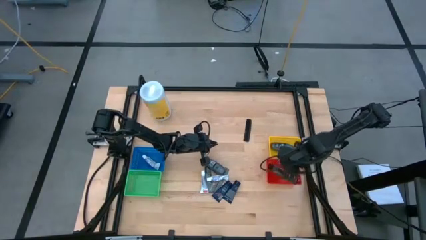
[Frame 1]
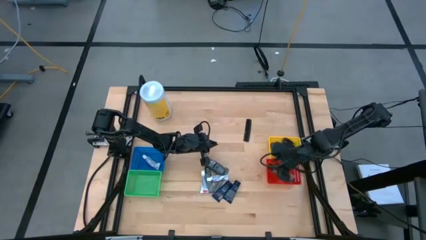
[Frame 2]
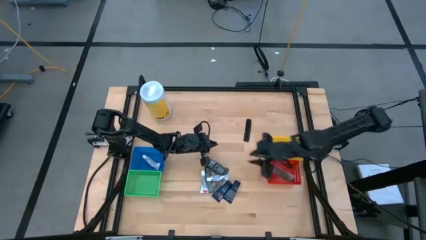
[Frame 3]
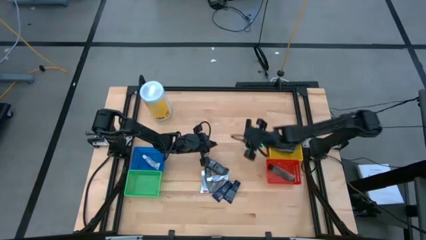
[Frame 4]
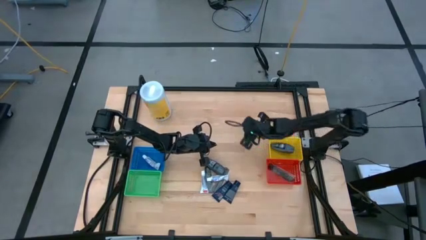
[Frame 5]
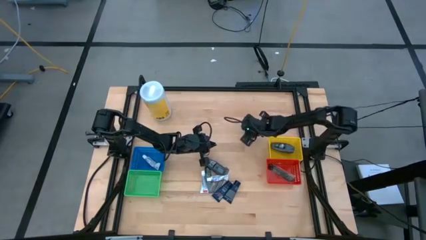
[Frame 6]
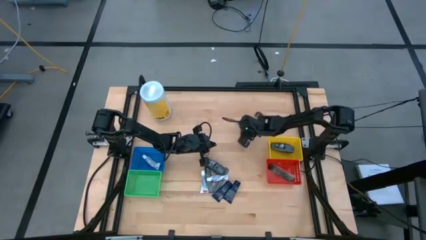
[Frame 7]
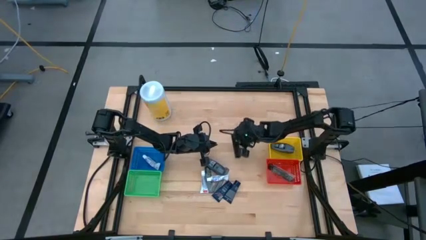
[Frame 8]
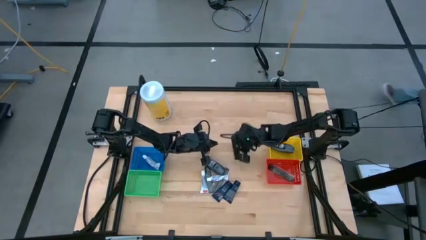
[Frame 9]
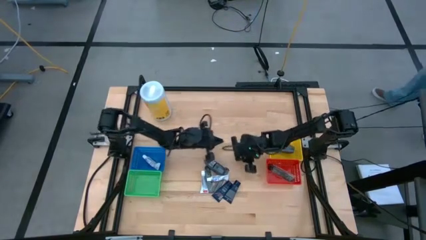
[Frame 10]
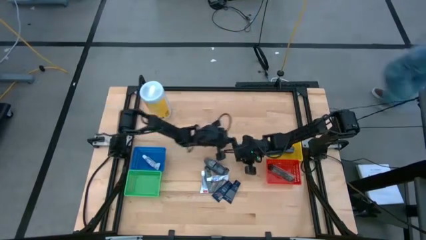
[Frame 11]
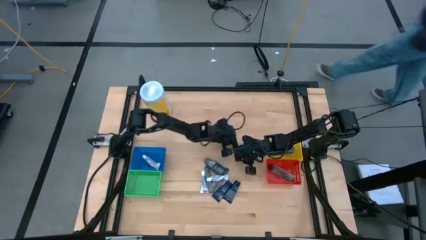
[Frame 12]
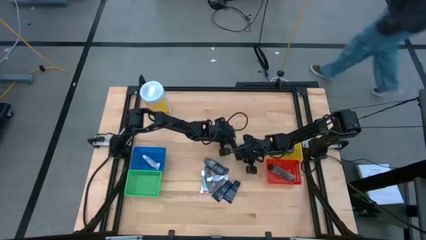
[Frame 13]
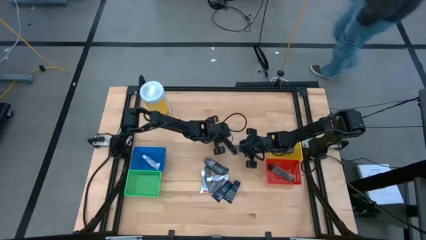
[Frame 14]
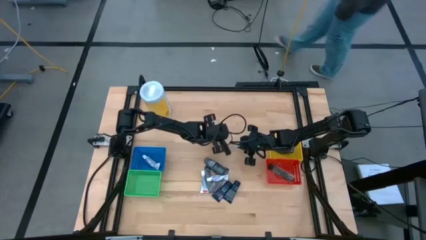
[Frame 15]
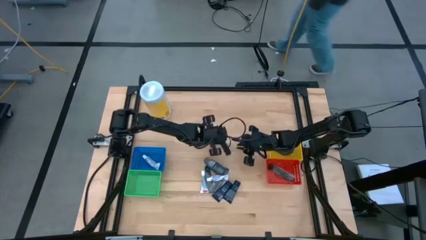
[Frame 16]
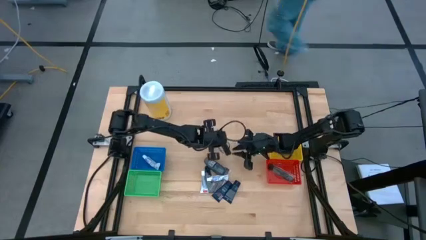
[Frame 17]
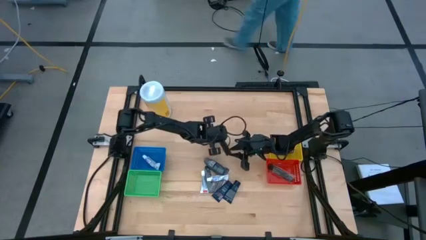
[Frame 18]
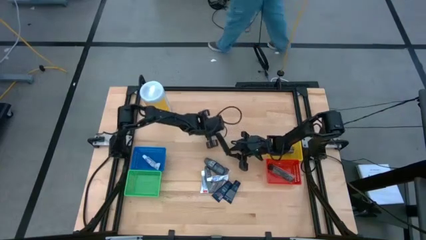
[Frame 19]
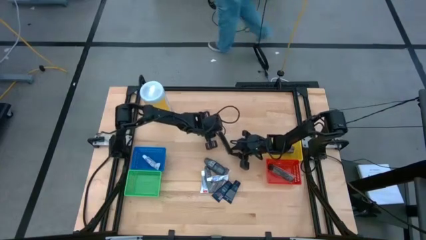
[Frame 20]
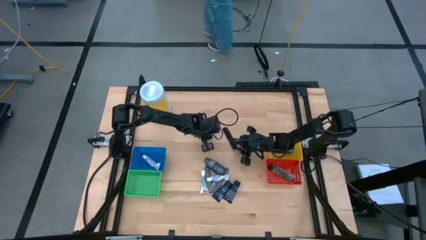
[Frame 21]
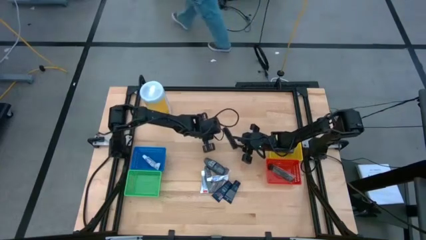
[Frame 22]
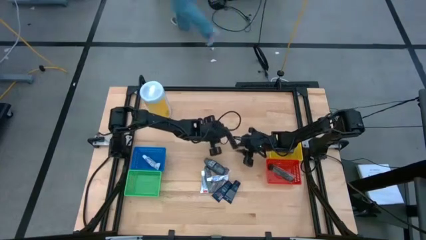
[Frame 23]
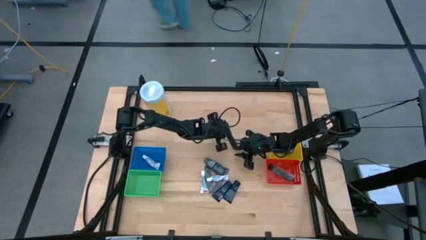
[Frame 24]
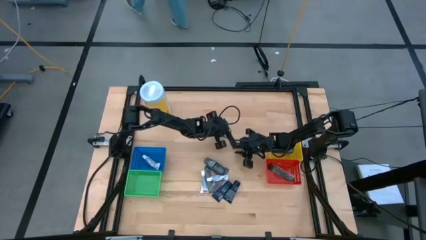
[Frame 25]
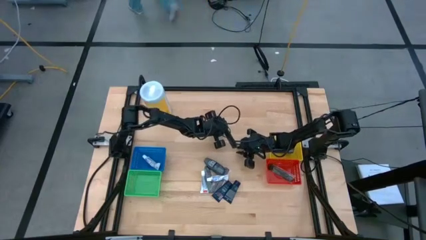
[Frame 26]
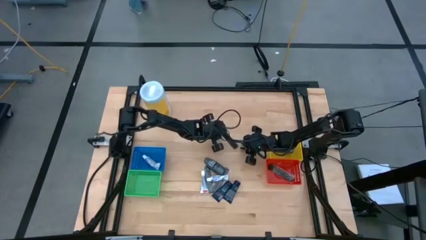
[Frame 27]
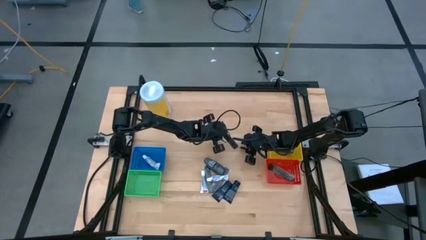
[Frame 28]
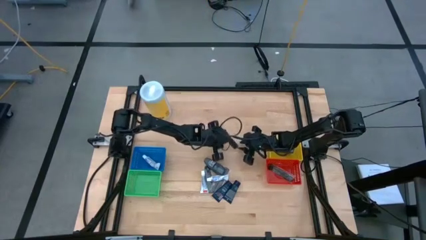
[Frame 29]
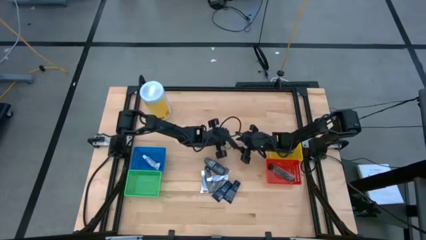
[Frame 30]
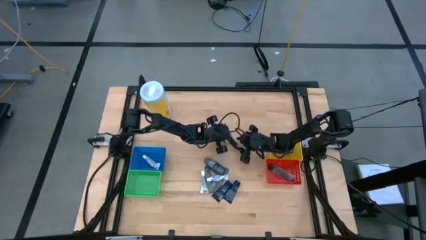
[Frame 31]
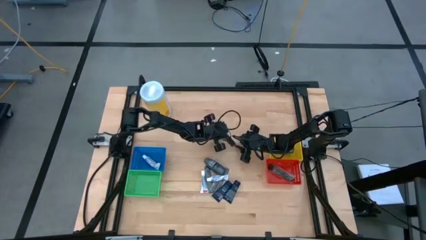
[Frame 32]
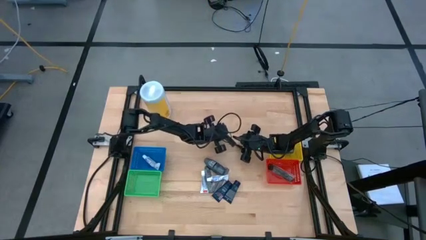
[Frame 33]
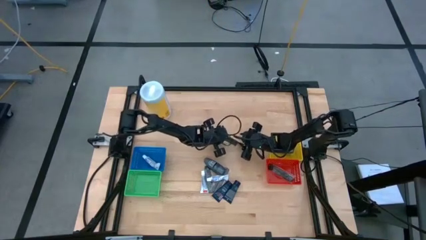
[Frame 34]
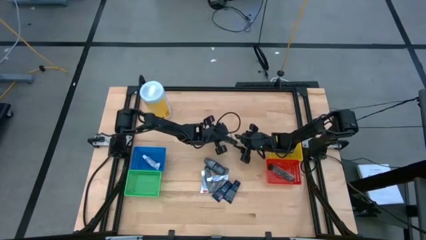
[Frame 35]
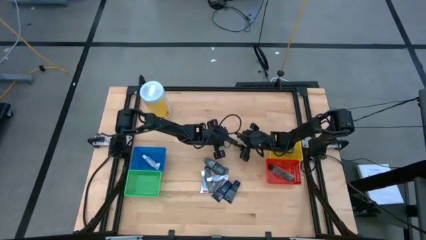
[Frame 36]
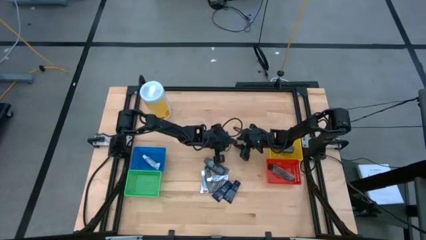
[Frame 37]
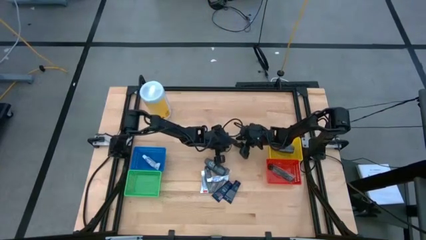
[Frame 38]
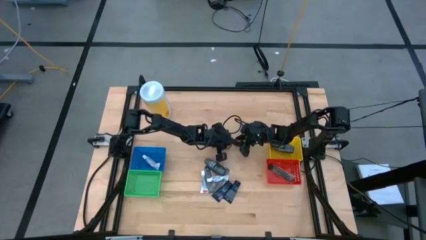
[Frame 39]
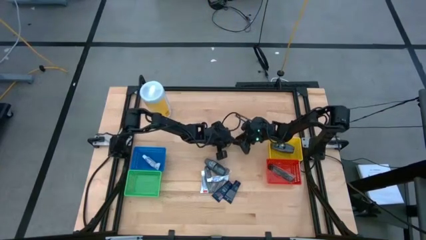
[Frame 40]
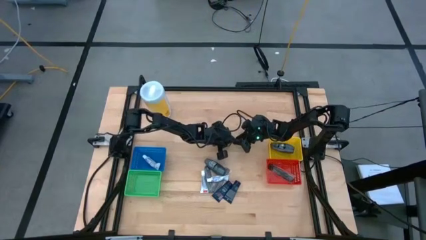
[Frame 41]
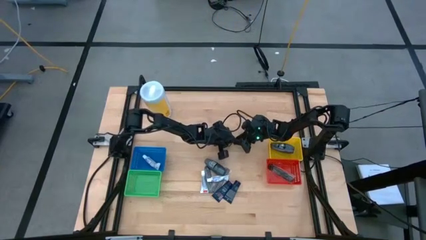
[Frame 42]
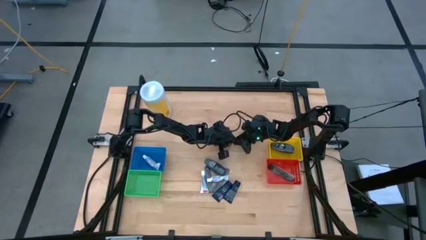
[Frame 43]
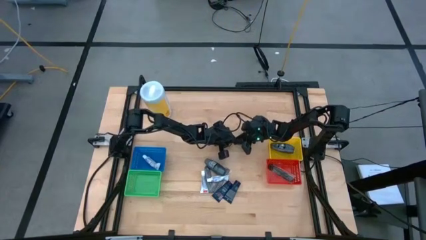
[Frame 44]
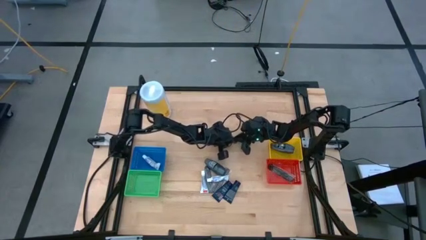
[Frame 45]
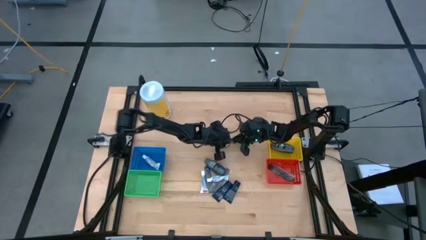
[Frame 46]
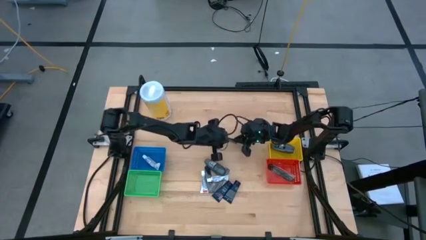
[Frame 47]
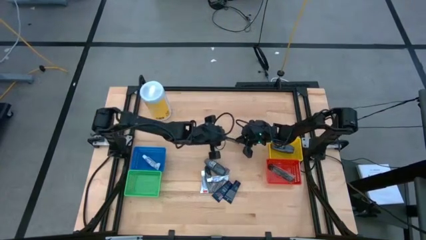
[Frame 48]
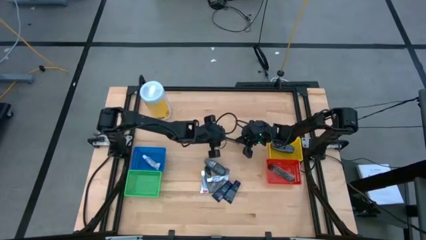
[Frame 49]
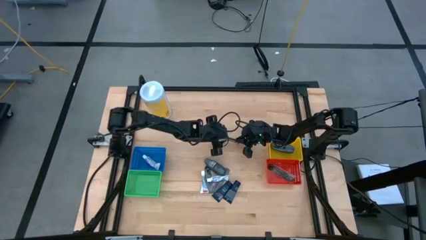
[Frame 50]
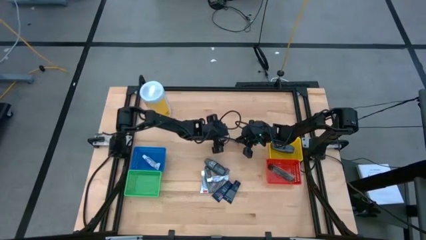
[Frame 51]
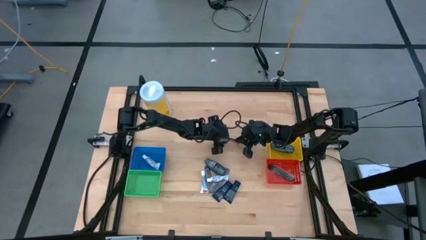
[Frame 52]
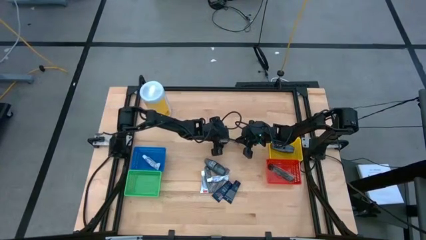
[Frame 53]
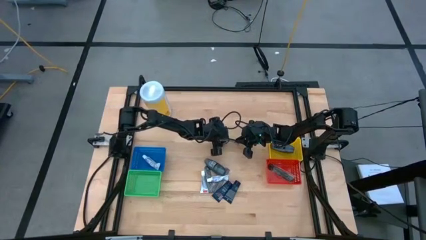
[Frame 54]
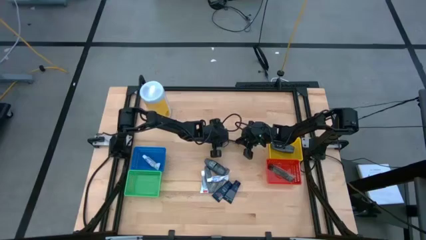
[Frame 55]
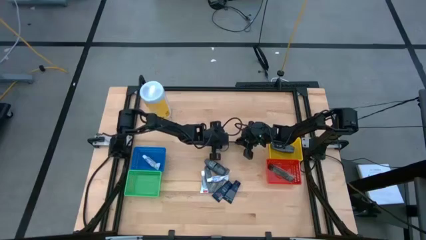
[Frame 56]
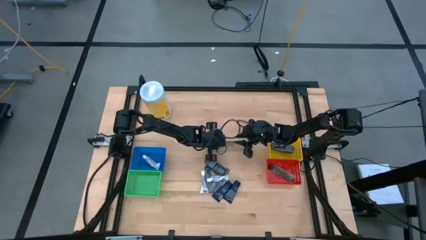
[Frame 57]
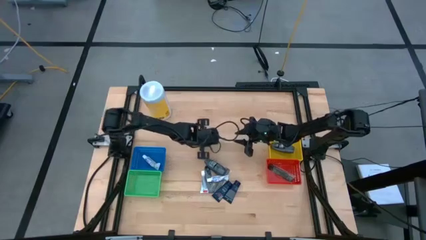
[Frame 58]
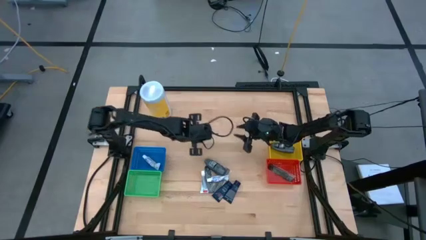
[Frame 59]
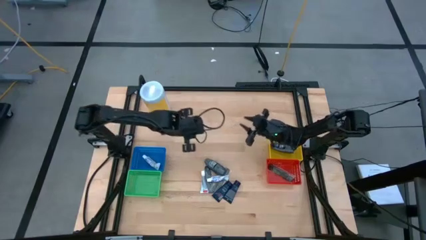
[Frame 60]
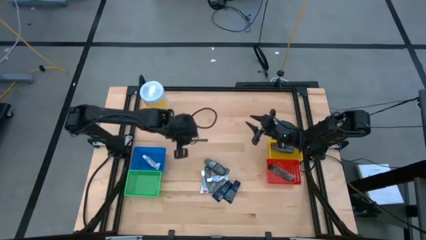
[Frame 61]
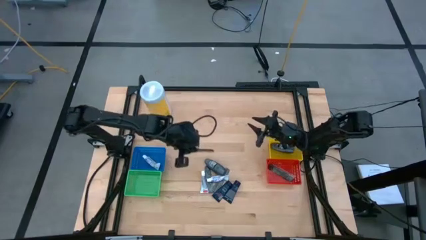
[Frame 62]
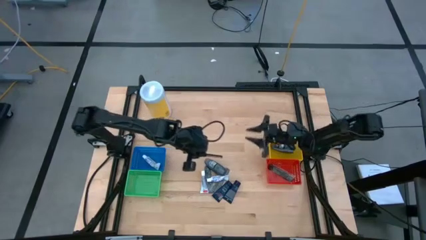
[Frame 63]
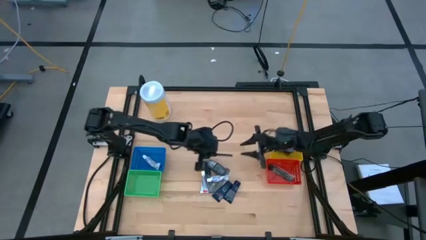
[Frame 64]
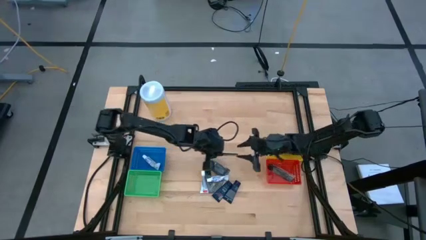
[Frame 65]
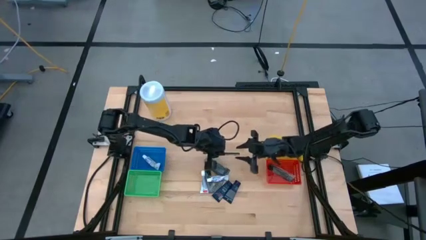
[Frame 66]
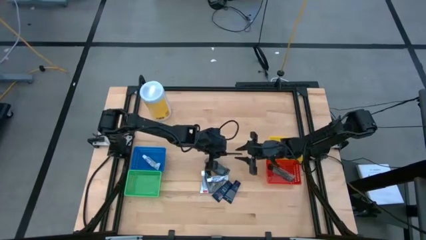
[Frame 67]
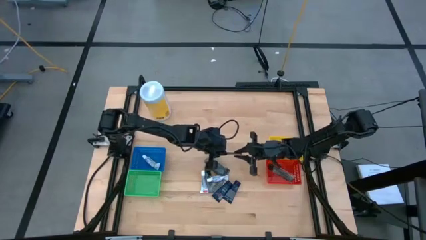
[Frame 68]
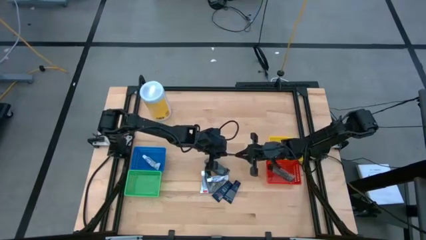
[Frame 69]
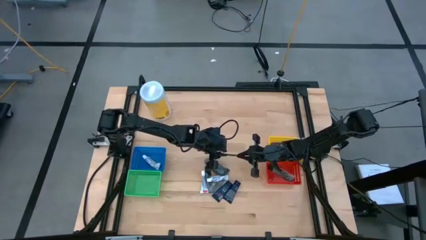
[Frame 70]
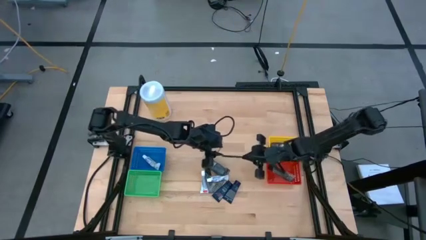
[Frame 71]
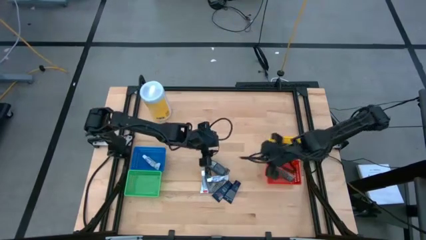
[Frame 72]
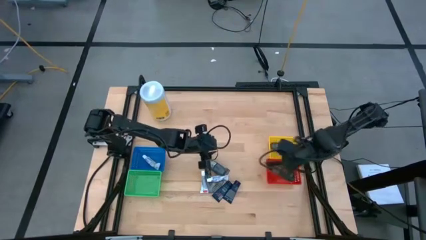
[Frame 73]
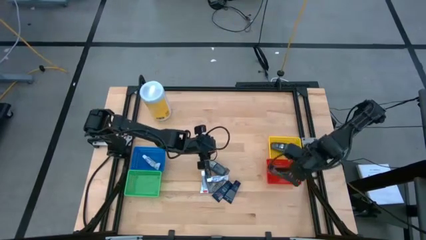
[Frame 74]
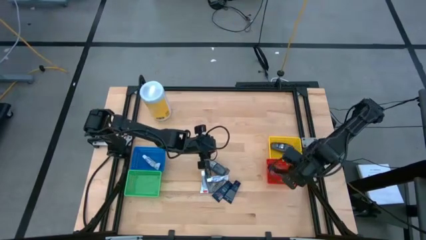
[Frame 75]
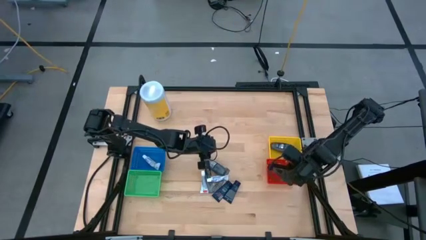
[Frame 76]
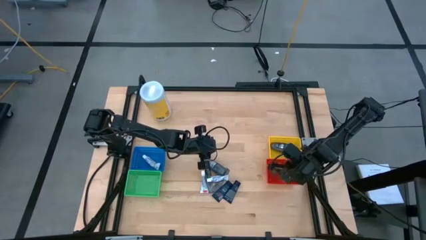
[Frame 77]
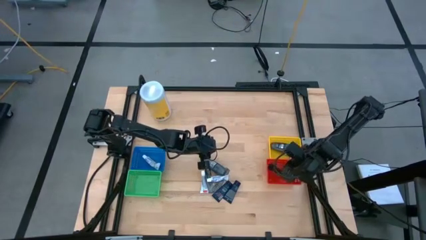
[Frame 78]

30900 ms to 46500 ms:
Task: Pick & Place Travel size toiletries
Put the black comb into the red basket

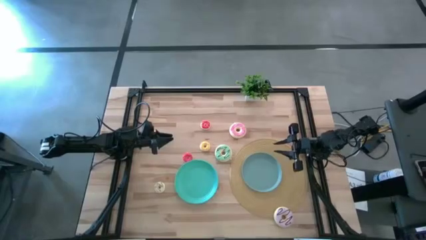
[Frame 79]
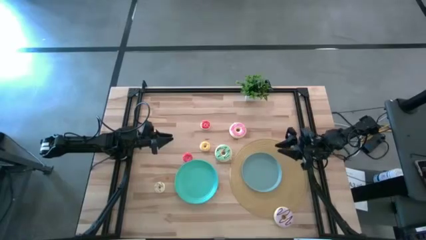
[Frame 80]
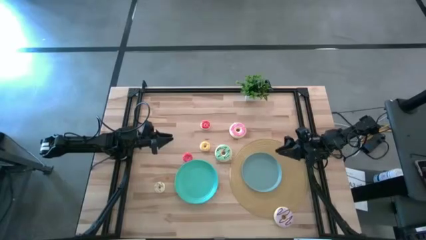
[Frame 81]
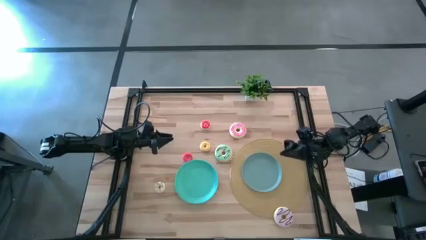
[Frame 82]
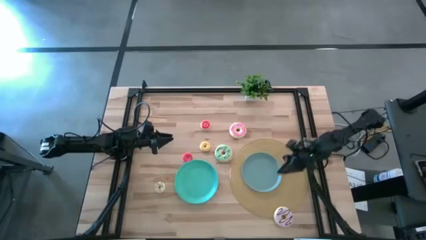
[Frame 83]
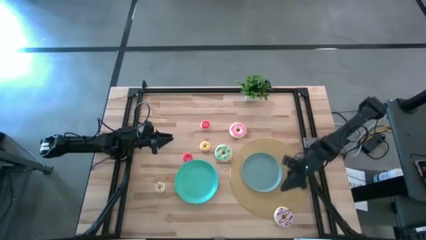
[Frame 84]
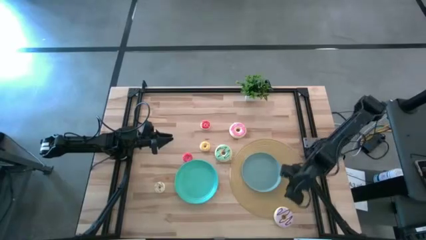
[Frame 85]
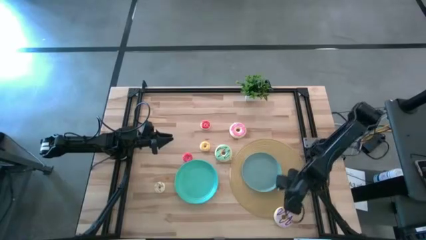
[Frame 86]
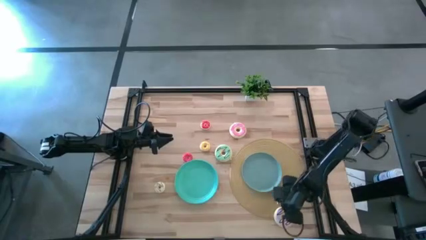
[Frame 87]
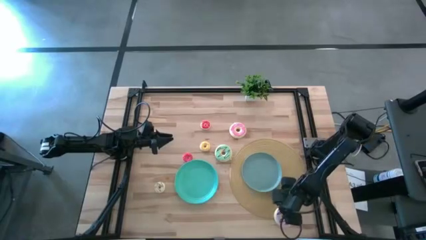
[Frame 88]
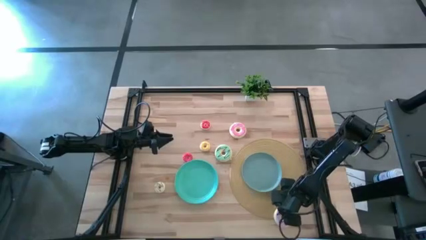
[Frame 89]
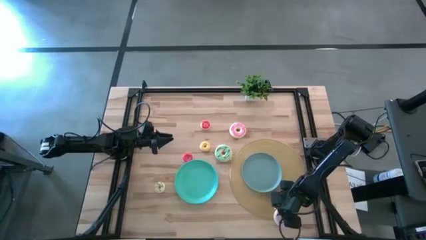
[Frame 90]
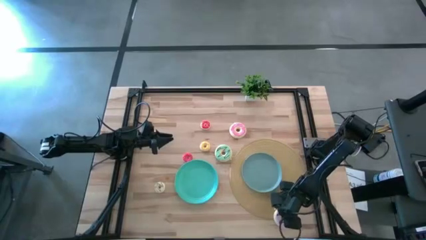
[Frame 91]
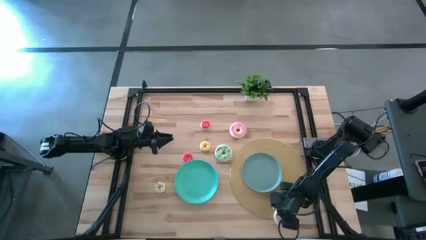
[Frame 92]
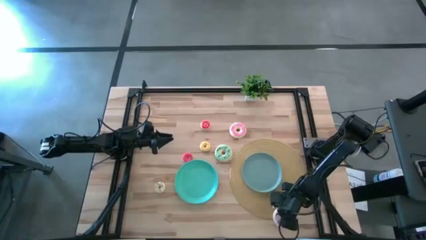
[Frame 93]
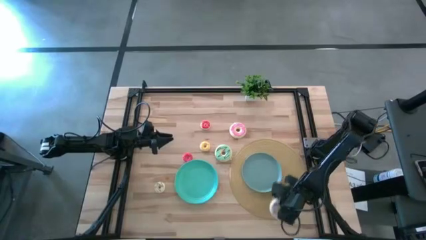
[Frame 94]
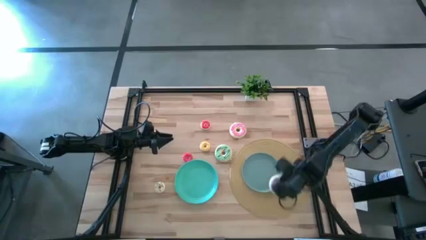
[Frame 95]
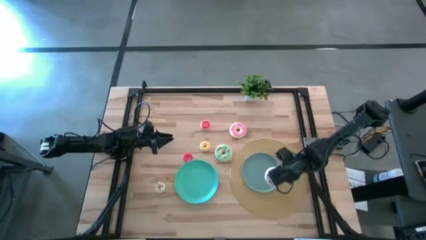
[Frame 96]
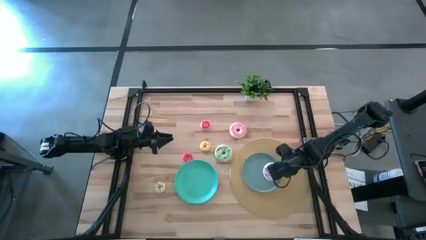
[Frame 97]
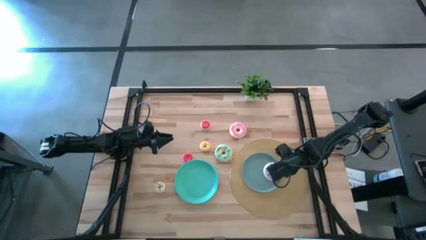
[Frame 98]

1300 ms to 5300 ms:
Task: Pick & Place donuts
Put the large violet donut on the blue plate
